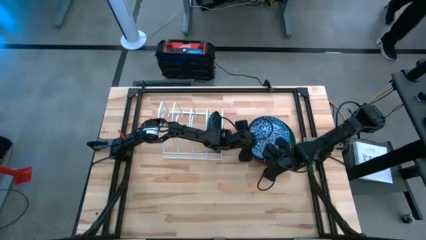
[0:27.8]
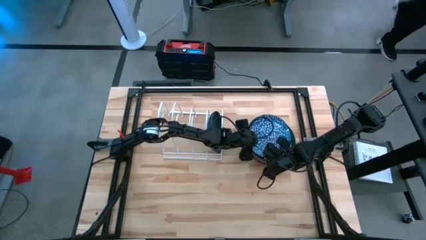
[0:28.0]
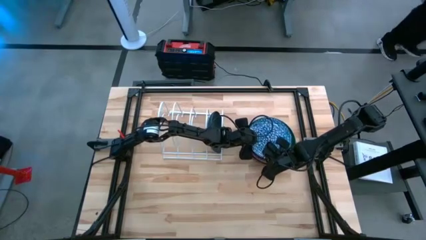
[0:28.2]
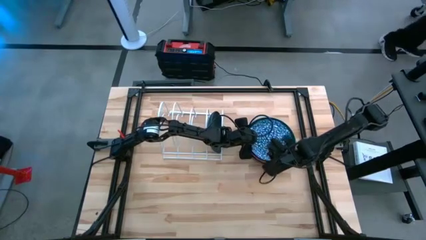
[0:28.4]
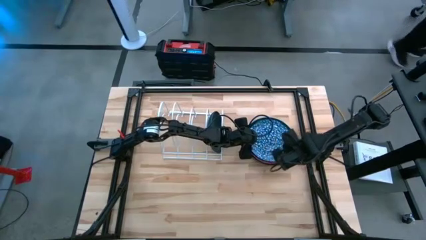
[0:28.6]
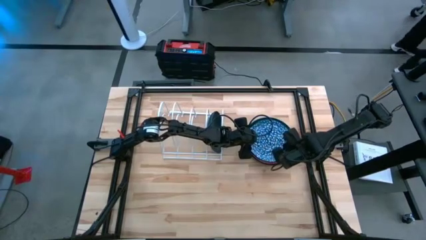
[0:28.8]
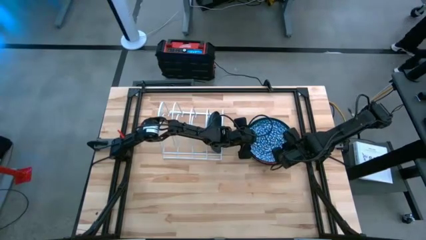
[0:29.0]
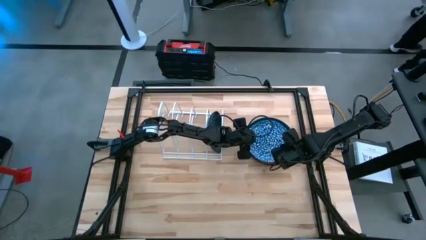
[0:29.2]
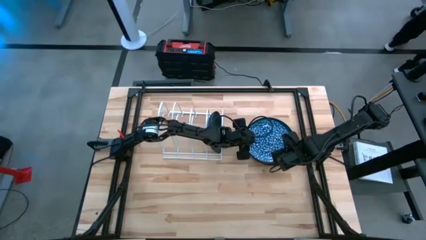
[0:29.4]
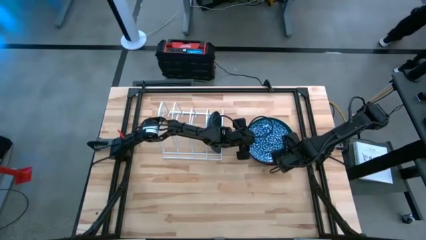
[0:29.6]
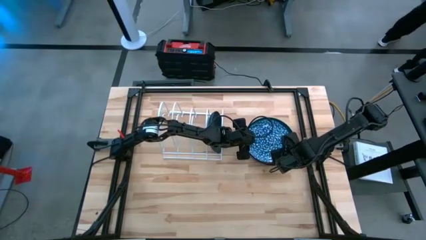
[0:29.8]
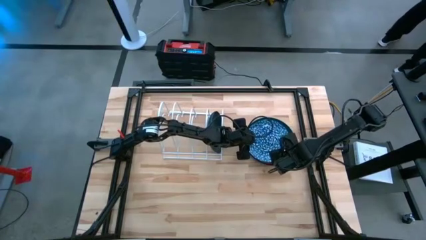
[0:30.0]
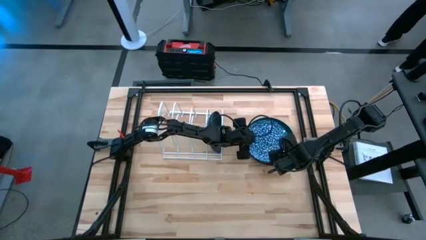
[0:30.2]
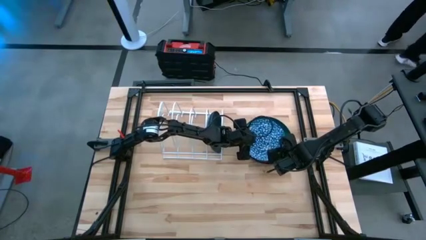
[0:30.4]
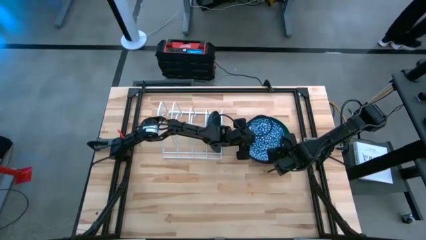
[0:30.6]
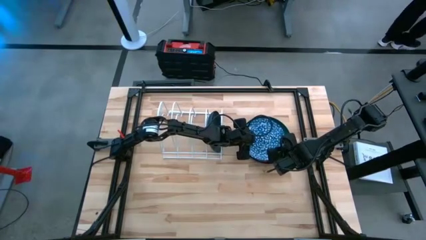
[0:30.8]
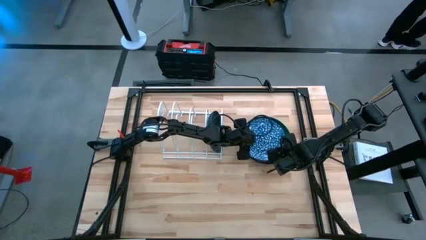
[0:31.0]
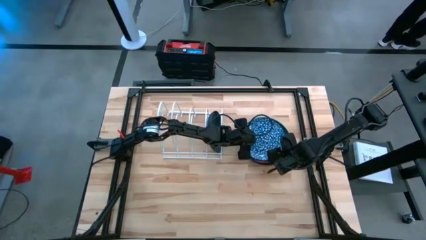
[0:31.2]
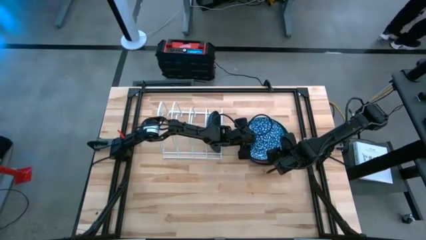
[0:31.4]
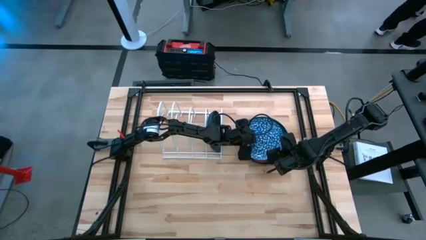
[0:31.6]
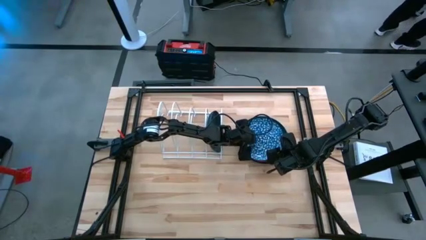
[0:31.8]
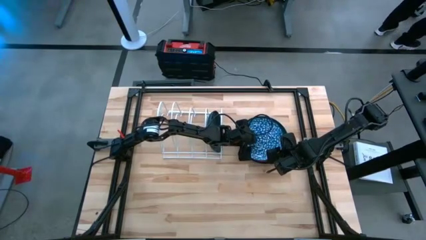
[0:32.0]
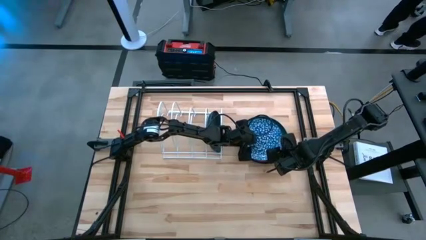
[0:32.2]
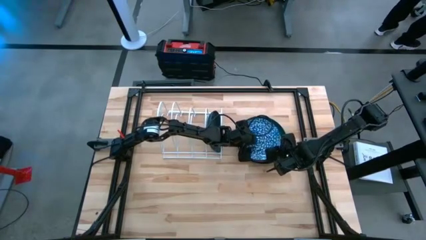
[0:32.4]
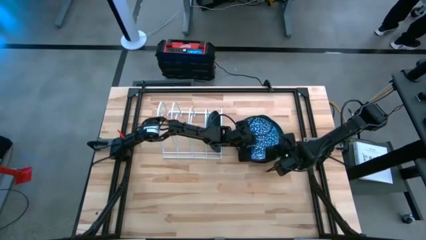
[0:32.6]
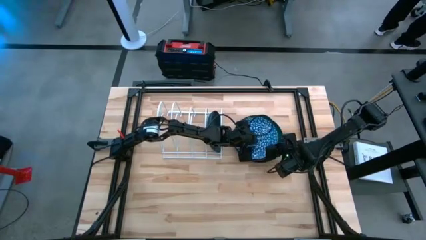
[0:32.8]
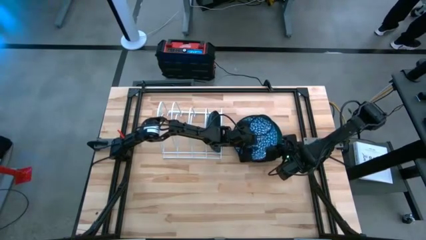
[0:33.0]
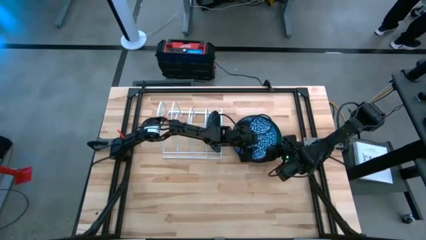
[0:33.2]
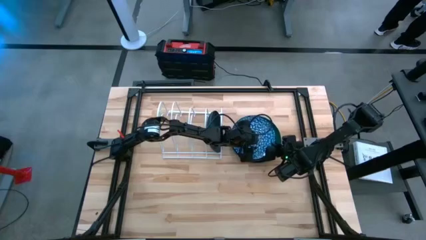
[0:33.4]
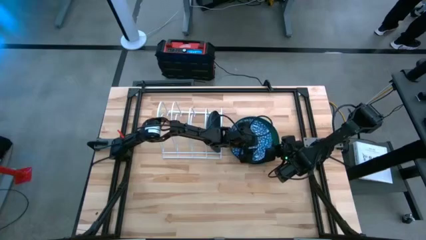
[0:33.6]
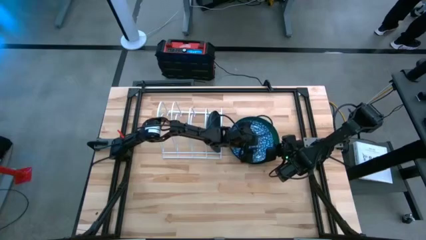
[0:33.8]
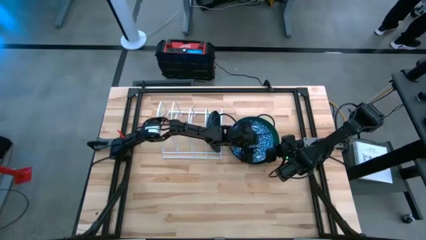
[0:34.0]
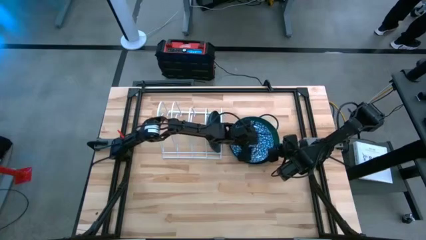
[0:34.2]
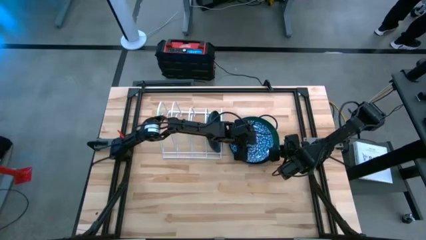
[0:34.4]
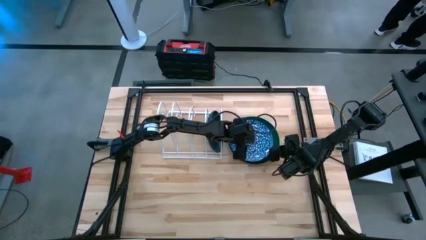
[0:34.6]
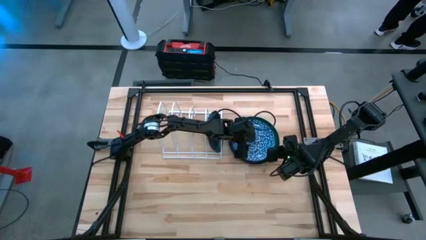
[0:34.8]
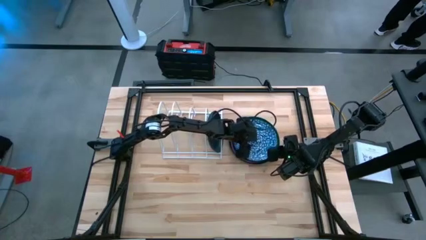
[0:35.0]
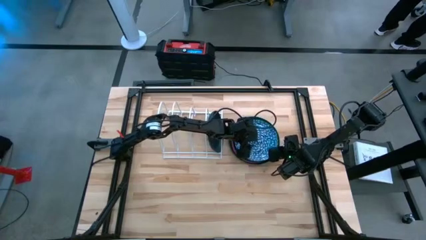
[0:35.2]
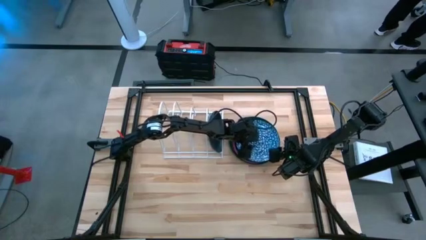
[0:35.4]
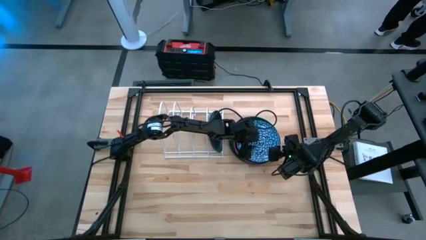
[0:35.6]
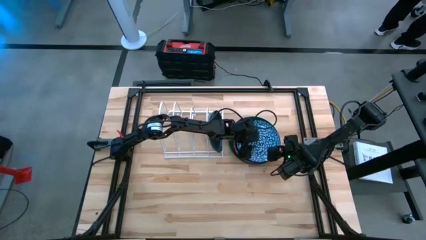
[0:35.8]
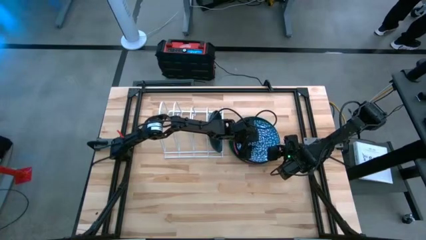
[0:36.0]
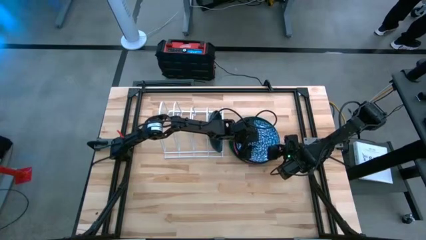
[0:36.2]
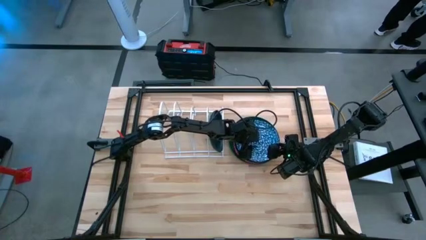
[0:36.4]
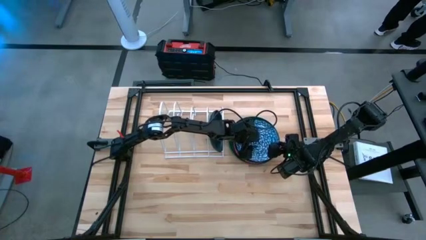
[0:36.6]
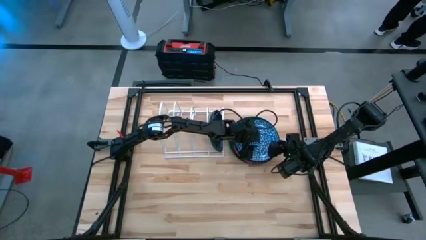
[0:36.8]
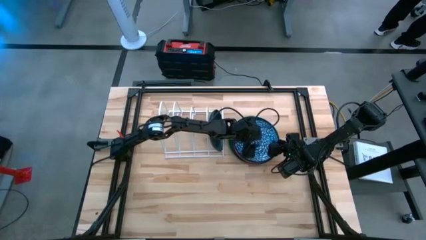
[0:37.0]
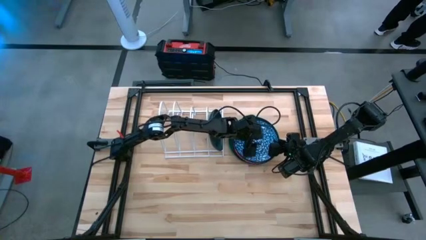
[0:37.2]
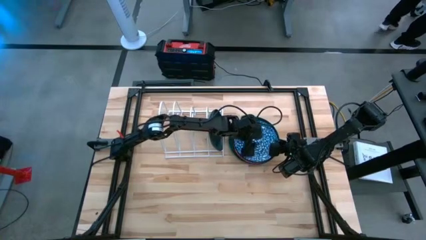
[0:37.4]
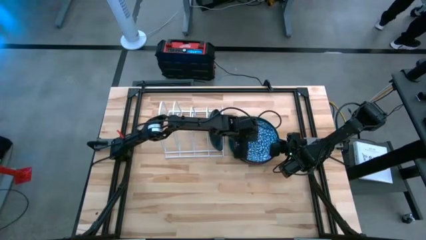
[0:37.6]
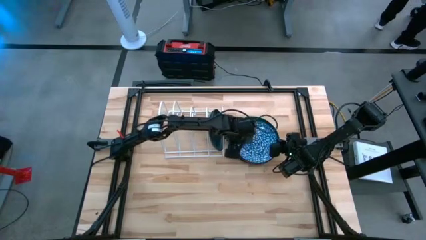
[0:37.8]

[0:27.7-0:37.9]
Task: Sort dishes
Put the blue patterned plate into the dish rack

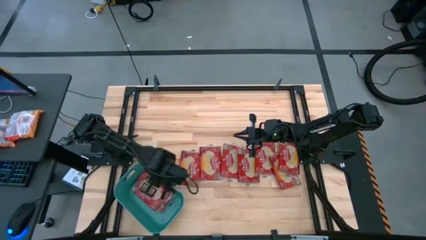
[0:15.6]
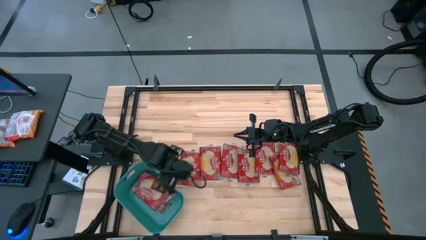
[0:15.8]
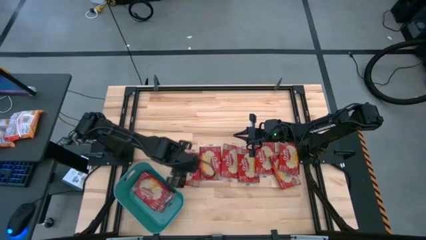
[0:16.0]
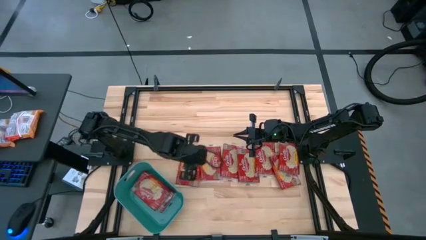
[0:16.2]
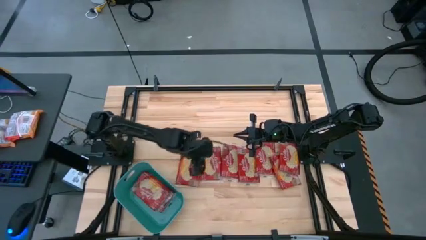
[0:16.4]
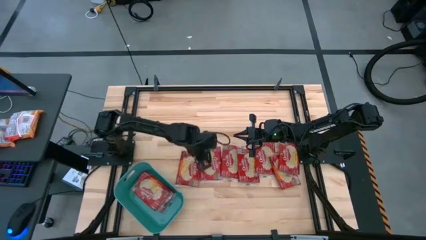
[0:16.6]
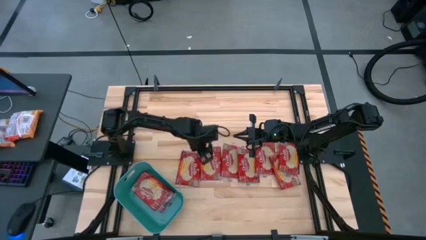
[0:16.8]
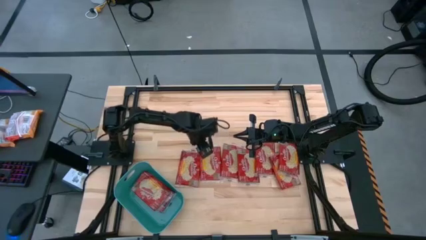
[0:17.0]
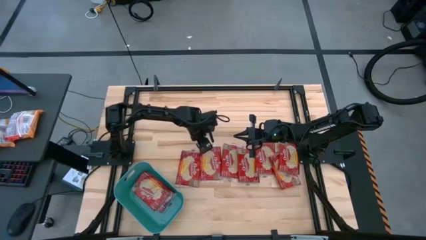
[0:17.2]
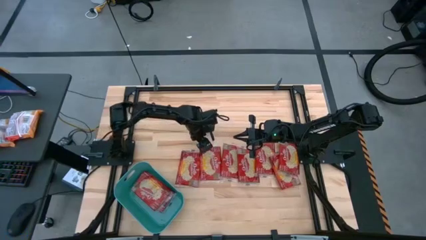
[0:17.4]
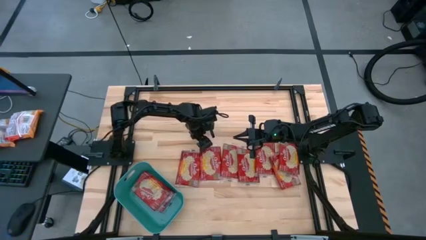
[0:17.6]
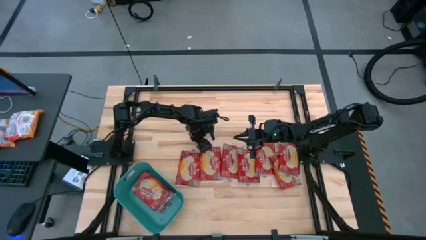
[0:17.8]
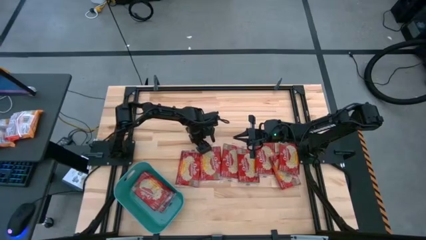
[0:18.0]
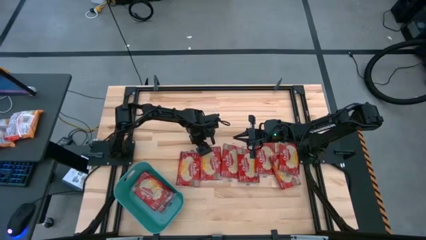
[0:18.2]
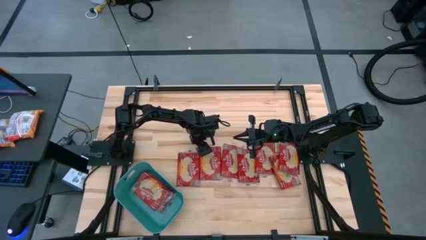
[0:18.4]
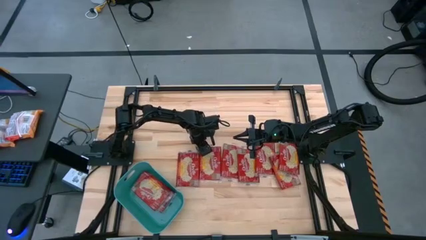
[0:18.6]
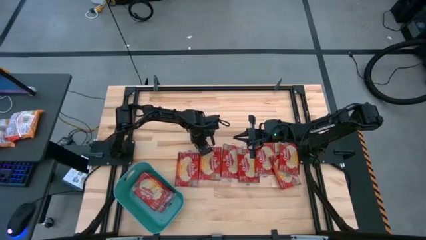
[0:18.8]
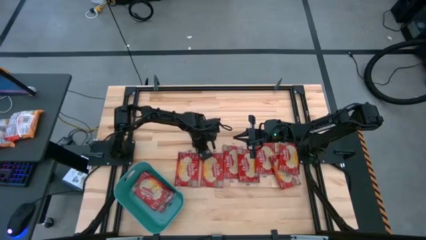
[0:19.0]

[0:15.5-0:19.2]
Task: Sort popcorn bags into baskets
Put the popcorn bag into the blue bin

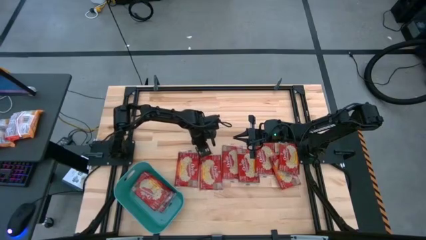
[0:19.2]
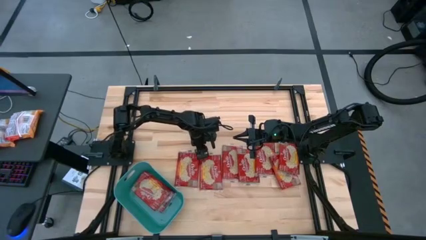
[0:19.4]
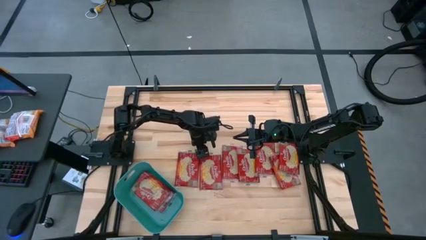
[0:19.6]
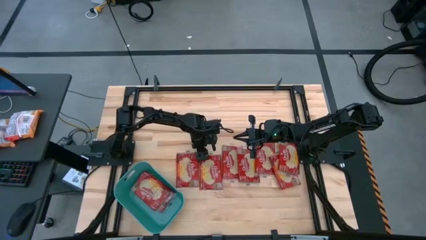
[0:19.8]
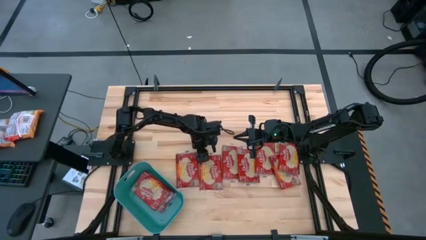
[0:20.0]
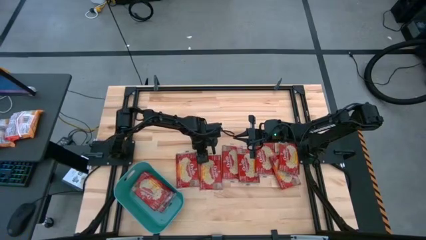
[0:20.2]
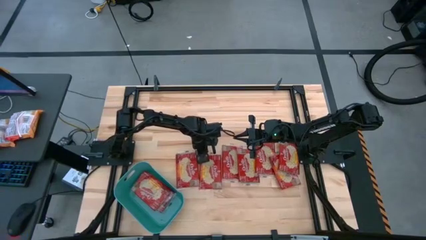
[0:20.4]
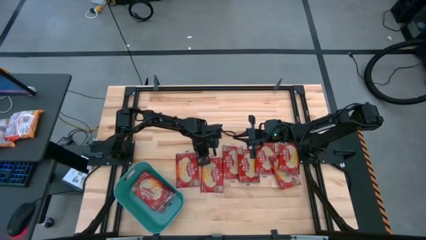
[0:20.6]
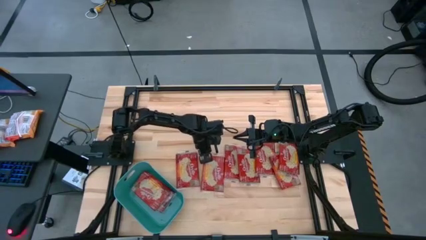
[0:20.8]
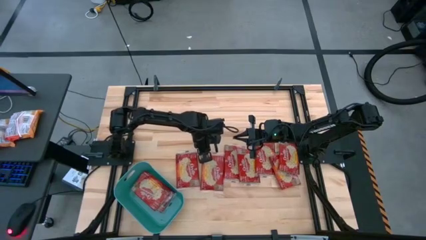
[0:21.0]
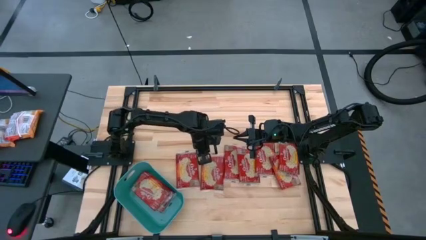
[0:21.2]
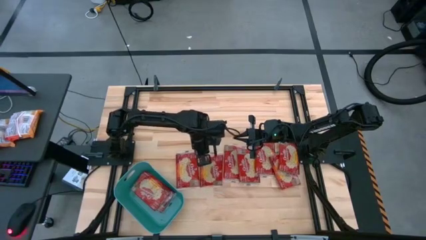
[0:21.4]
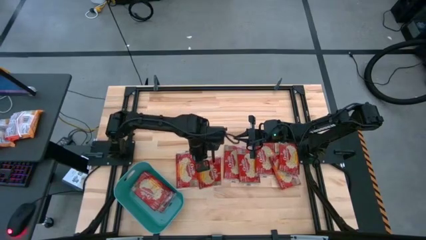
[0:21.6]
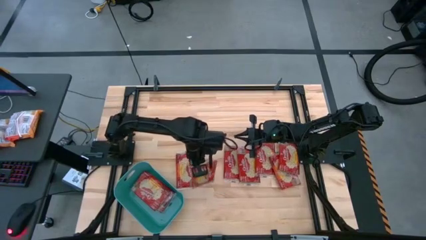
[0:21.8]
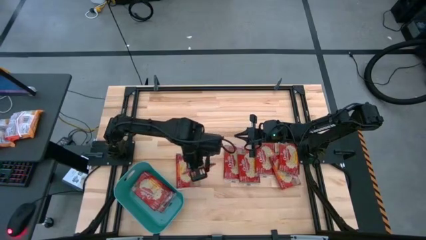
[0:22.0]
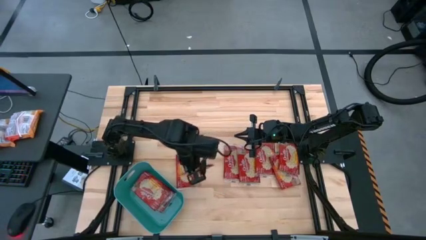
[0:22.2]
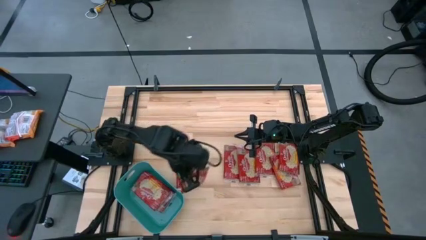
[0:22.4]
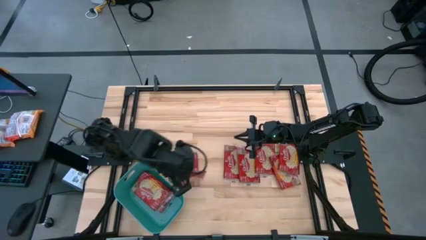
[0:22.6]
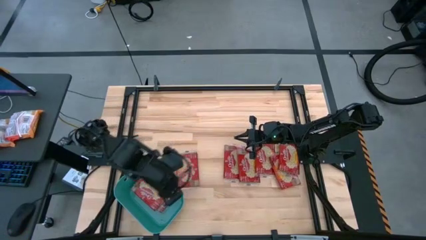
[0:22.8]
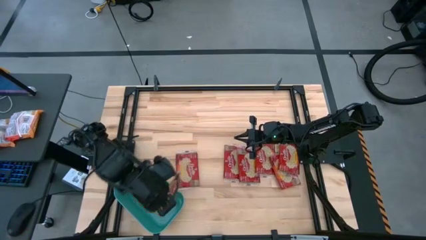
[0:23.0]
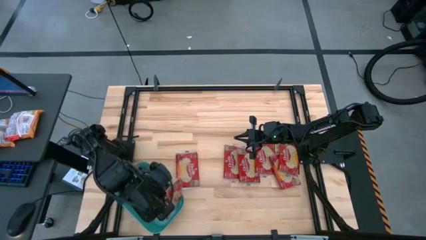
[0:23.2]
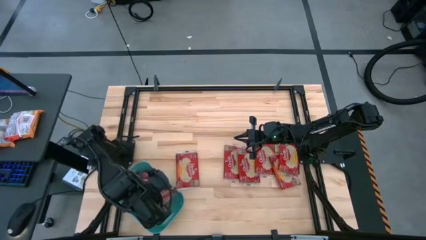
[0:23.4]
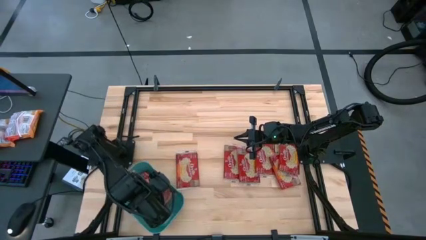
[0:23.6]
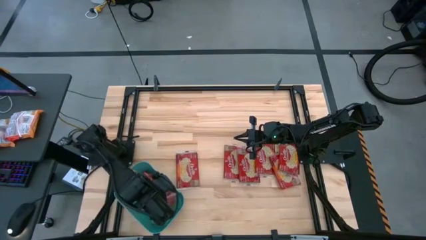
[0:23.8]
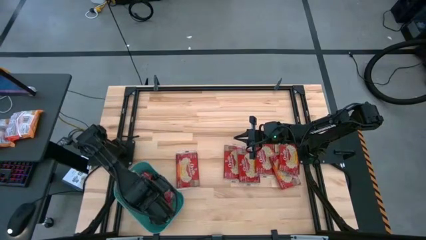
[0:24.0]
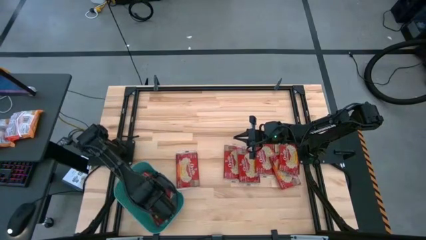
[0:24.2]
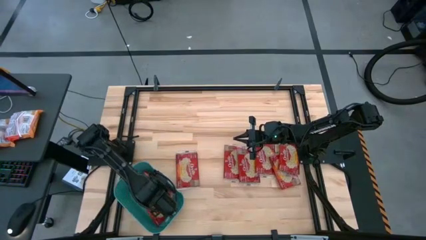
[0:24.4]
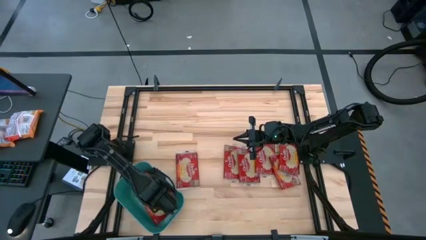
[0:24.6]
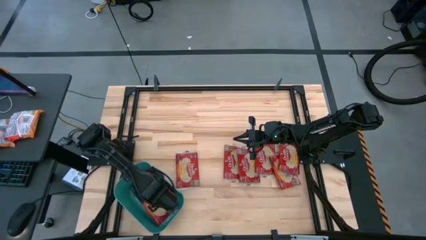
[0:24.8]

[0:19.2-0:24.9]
Put the popcorn bag into the blue bin
